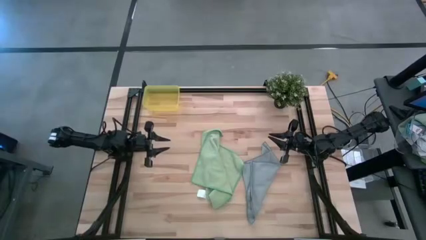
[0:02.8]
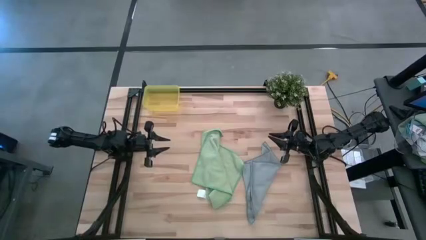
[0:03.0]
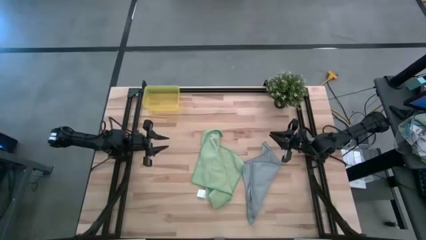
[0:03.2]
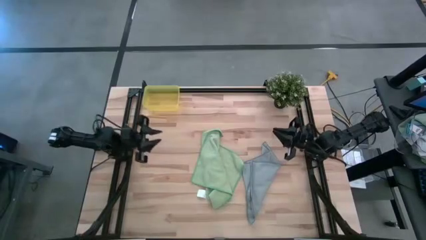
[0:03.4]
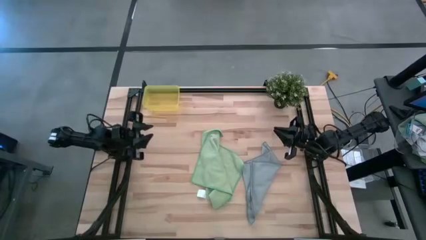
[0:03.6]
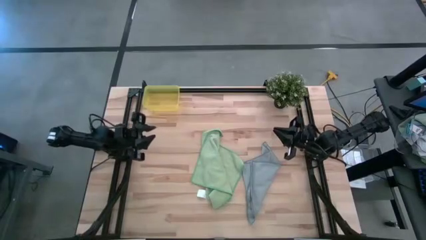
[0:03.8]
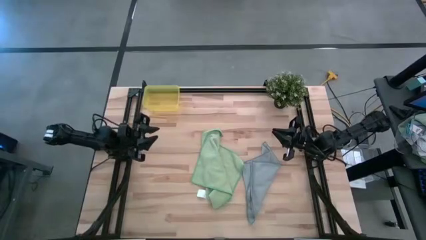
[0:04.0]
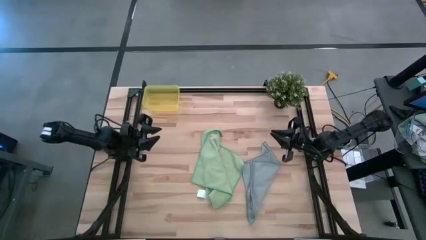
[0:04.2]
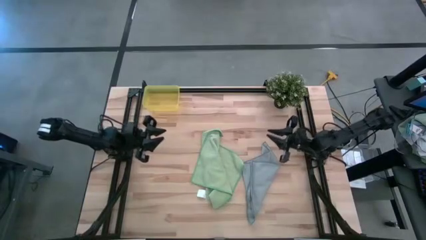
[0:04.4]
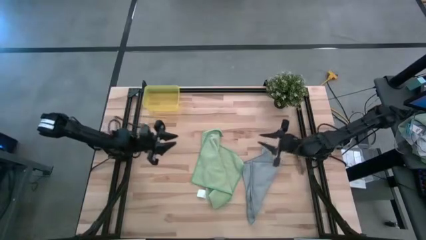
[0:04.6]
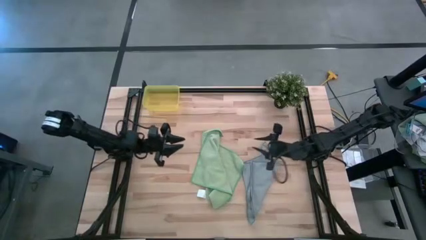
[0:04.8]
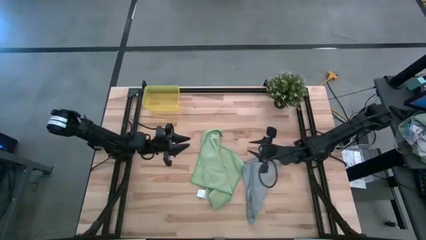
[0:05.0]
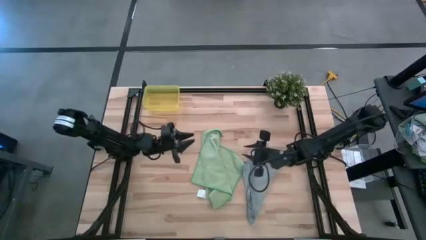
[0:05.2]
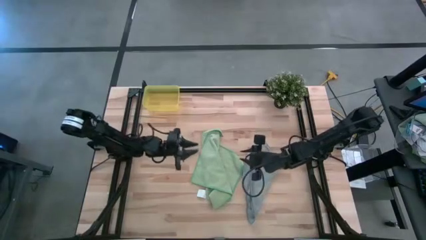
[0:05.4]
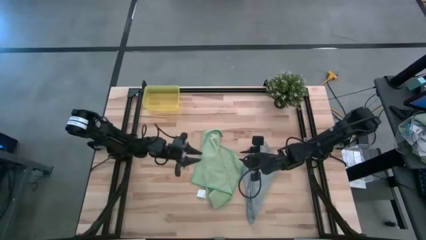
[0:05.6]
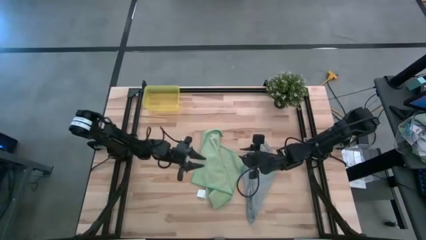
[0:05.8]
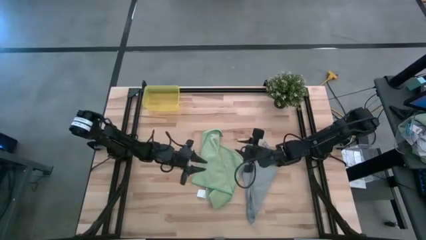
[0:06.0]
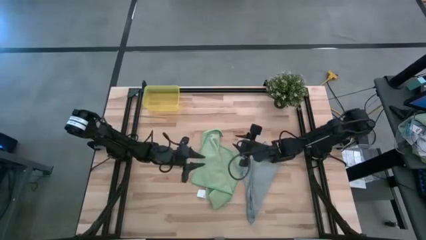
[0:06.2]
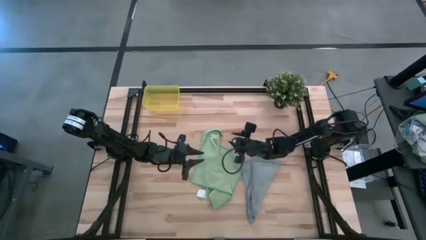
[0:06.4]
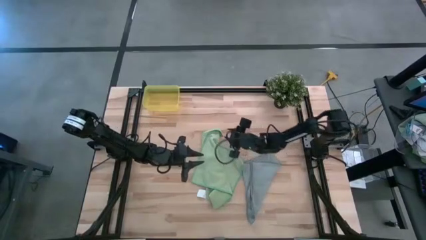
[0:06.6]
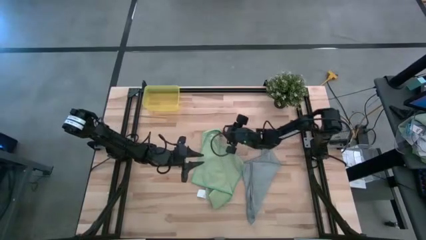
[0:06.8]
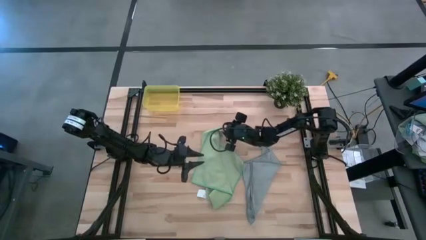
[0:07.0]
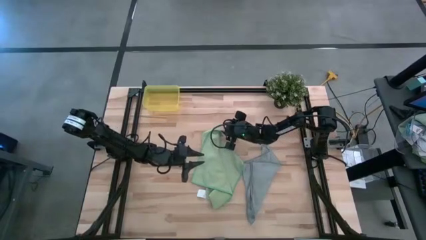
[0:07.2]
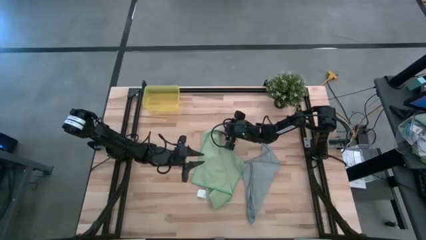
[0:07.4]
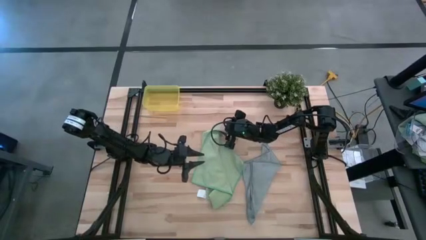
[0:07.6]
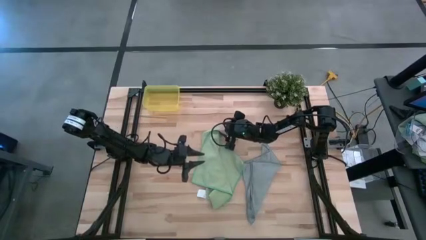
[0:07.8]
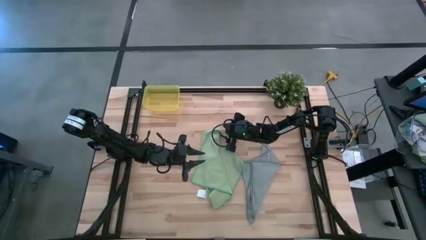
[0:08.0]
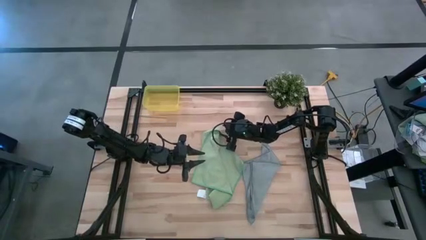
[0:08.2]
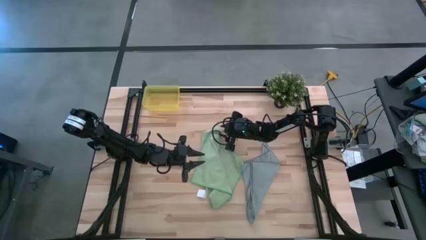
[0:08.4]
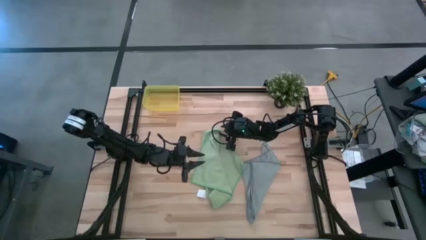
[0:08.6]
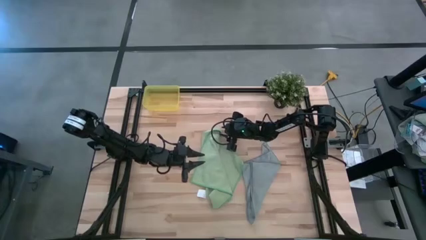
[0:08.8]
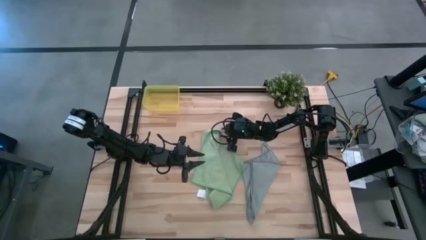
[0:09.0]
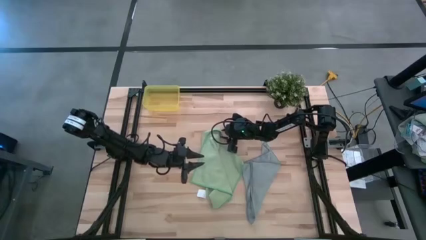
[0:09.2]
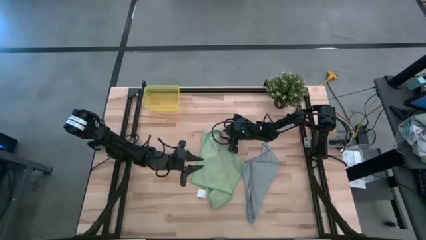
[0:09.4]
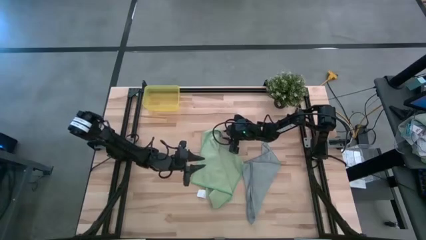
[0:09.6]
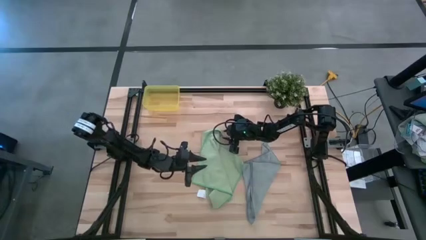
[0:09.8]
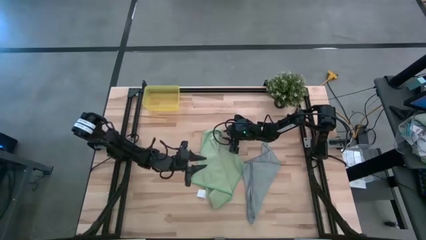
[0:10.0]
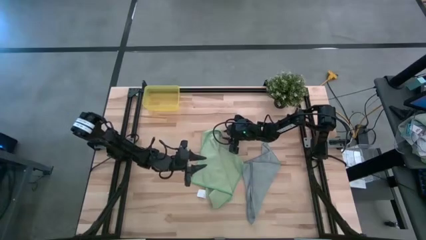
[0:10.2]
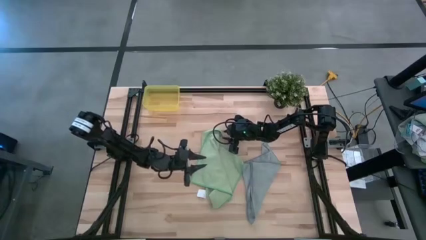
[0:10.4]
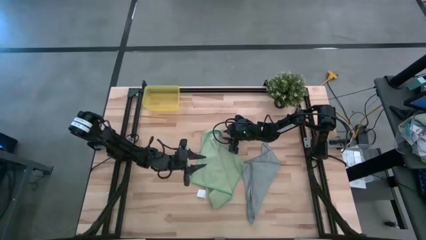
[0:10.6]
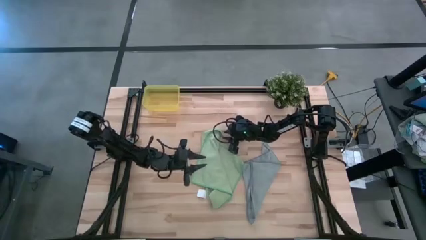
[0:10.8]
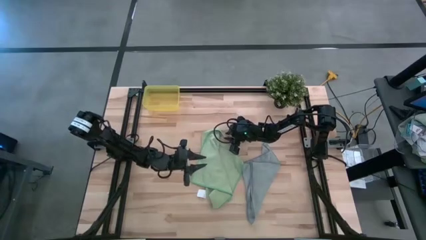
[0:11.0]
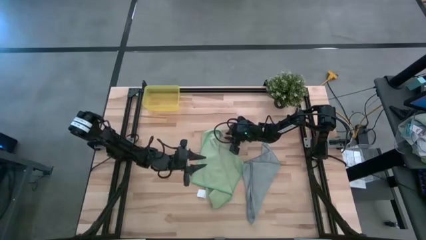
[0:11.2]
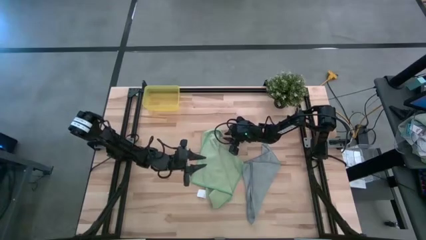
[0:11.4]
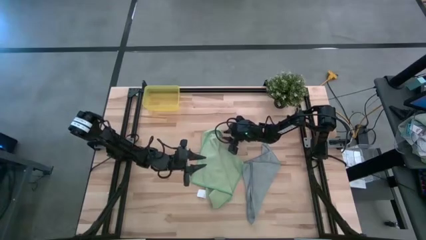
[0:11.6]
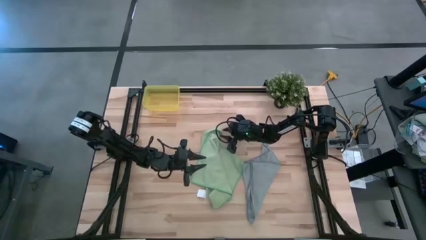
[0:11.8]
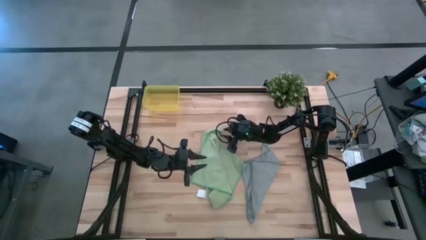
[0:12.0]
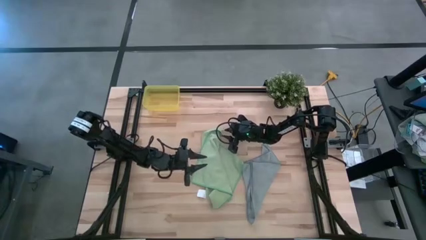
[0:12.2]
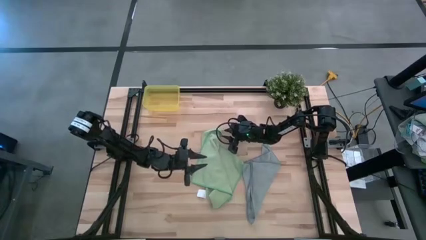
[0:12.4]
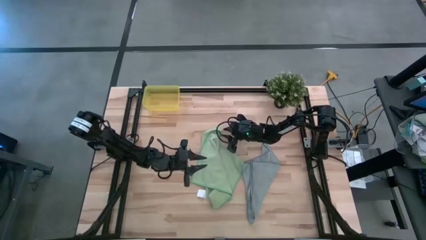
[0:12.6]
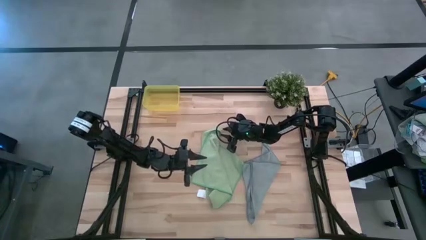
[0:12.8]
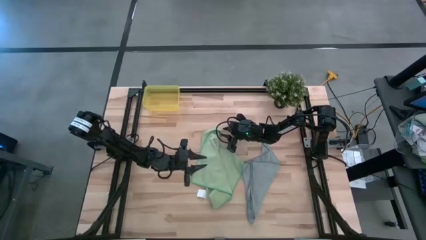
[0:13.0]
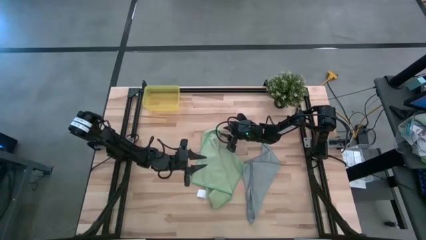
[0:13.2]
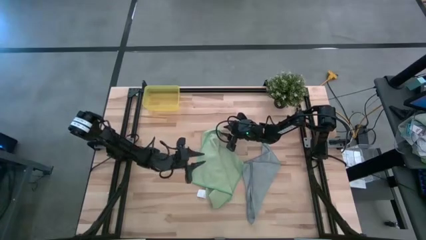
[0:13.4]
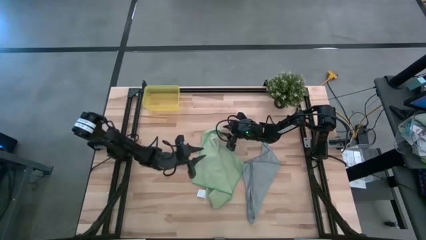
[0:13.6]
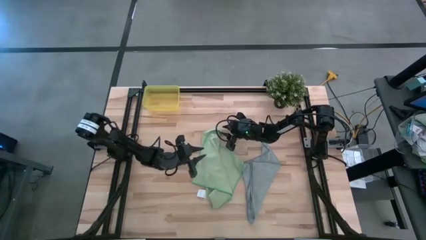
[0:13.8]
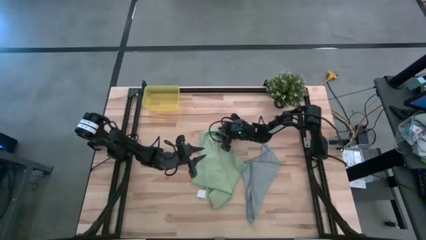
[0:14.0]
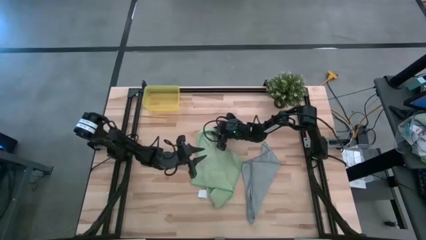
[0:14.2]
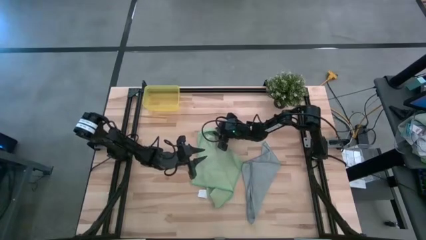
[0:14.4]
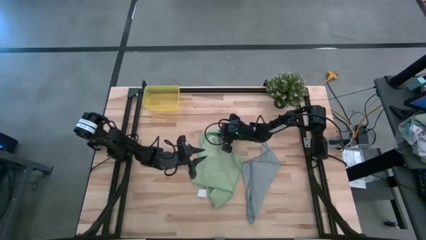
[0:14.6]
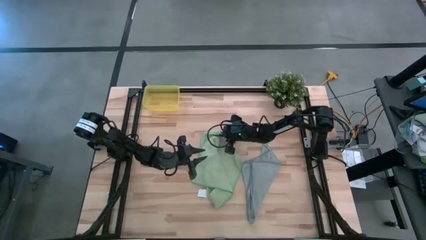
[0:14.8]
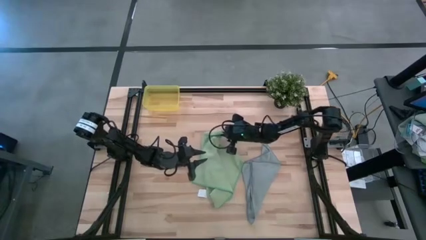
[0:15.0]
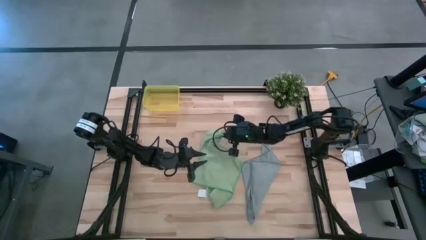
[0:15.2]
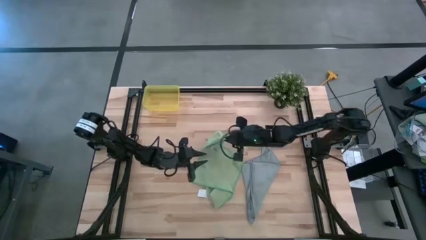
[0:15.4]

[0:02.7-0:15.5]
Task: Roll microfiber towels into tight, uniform cylinder then place into a basket
Fold the green towel
